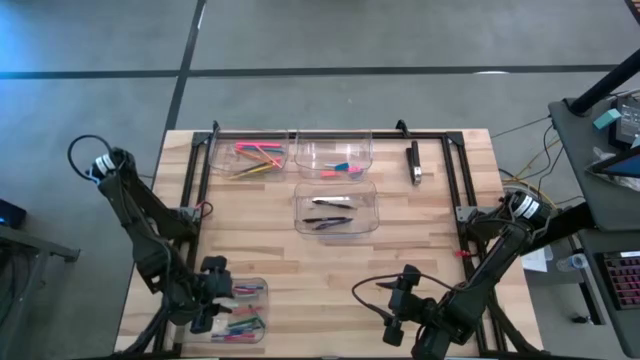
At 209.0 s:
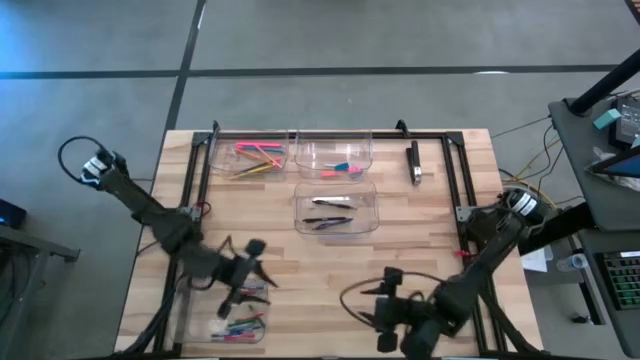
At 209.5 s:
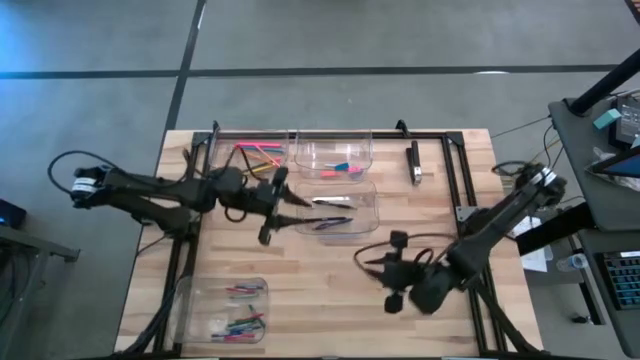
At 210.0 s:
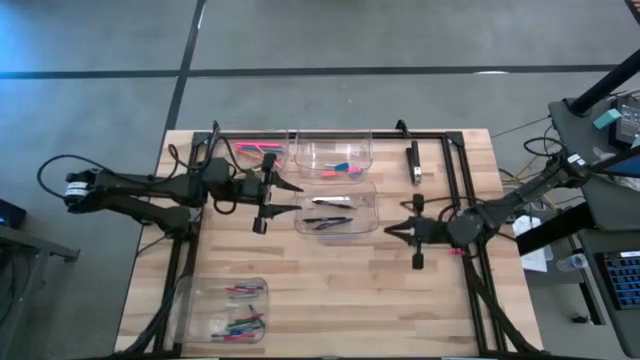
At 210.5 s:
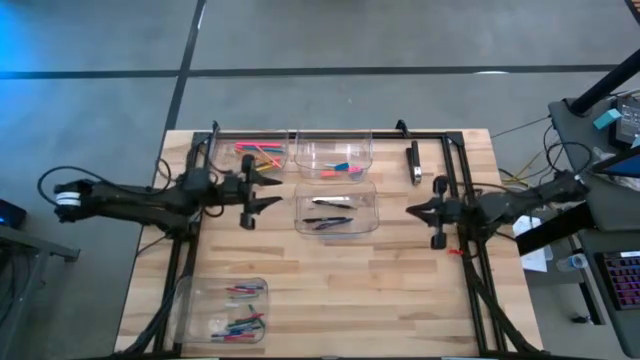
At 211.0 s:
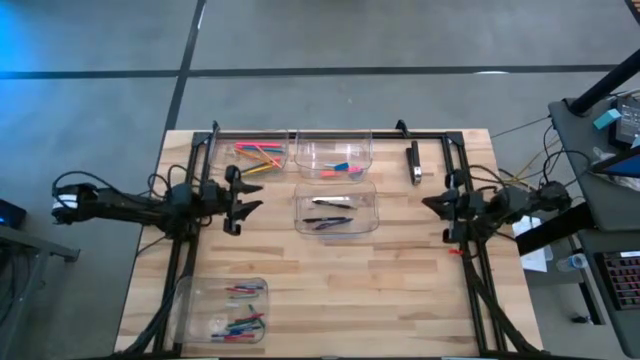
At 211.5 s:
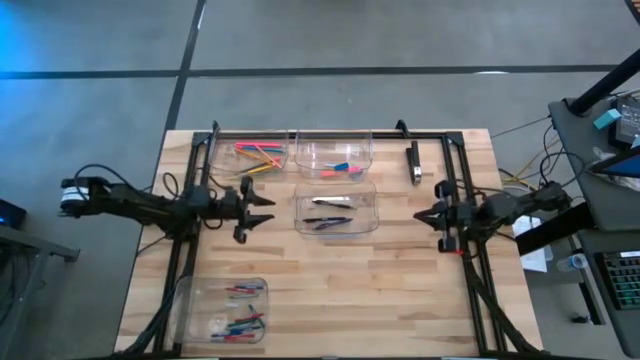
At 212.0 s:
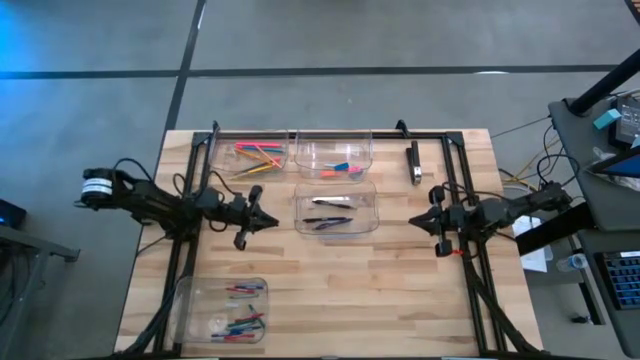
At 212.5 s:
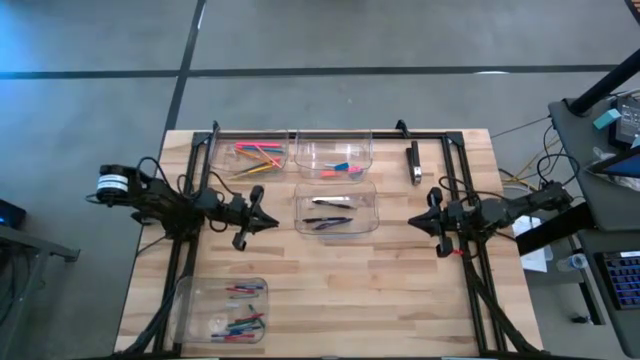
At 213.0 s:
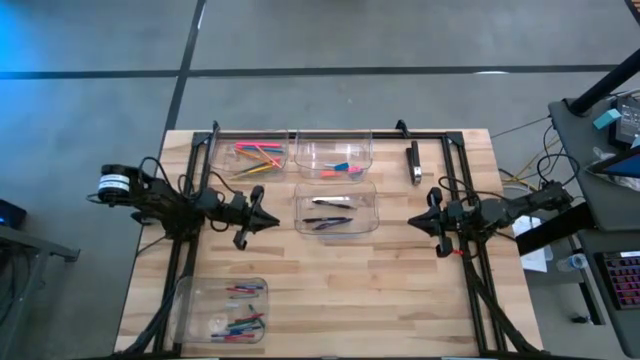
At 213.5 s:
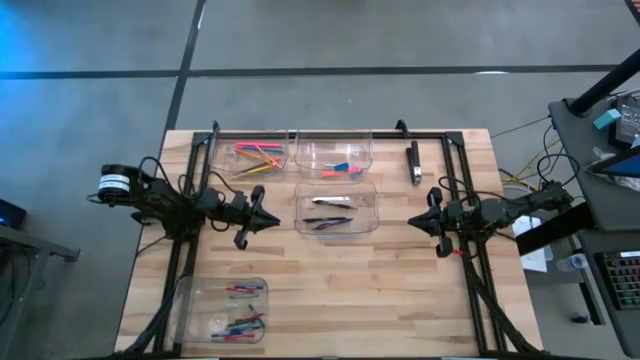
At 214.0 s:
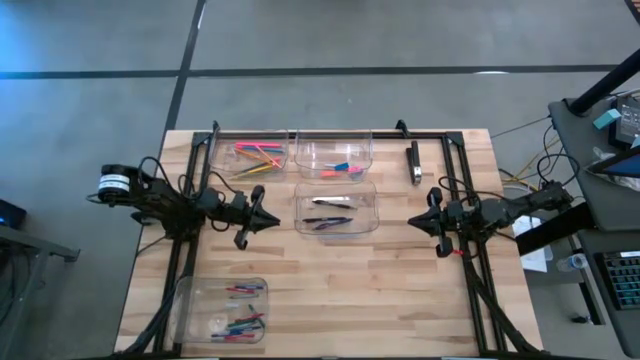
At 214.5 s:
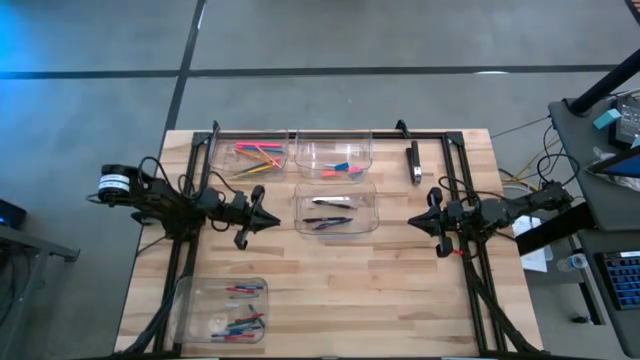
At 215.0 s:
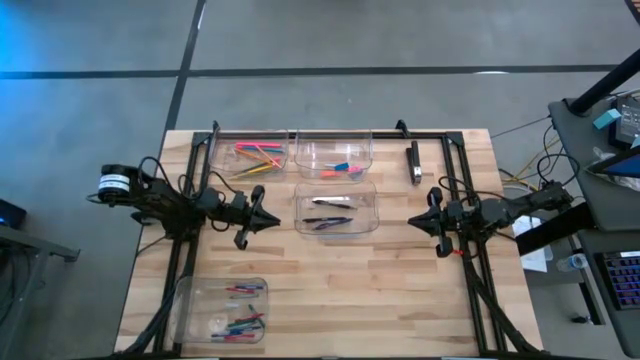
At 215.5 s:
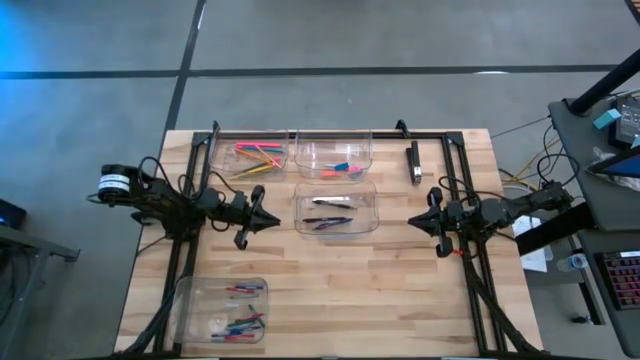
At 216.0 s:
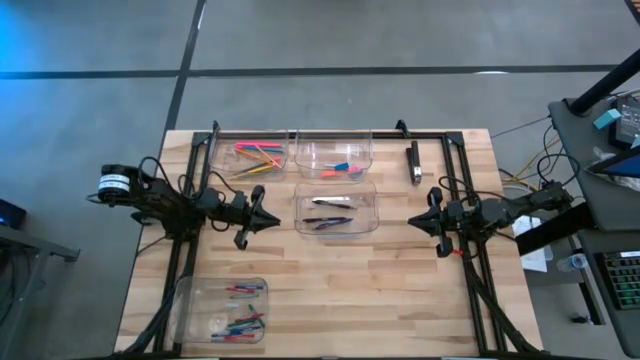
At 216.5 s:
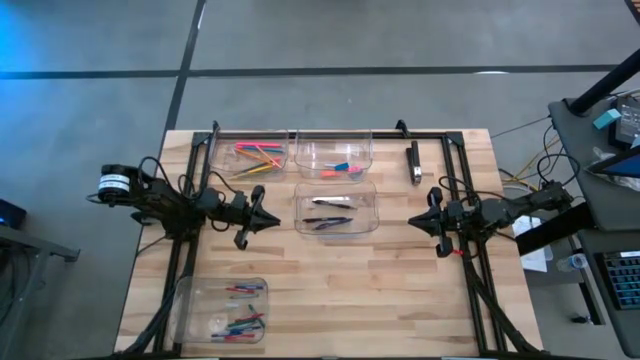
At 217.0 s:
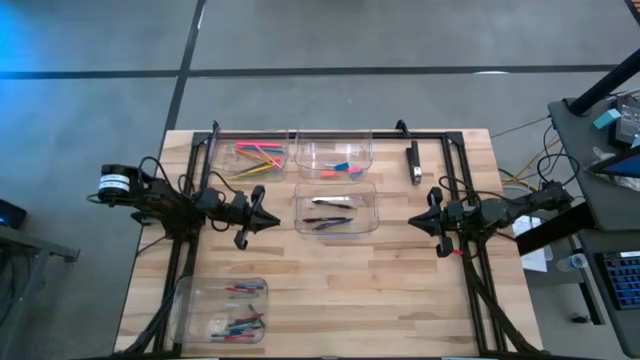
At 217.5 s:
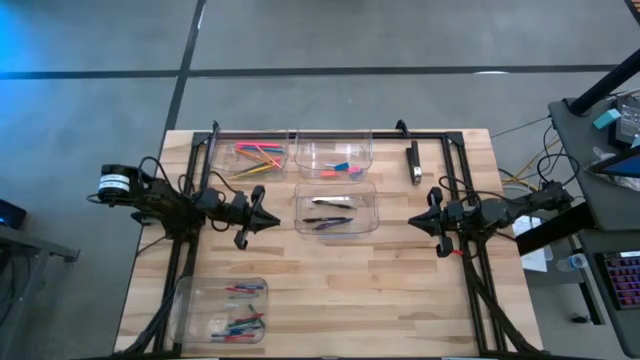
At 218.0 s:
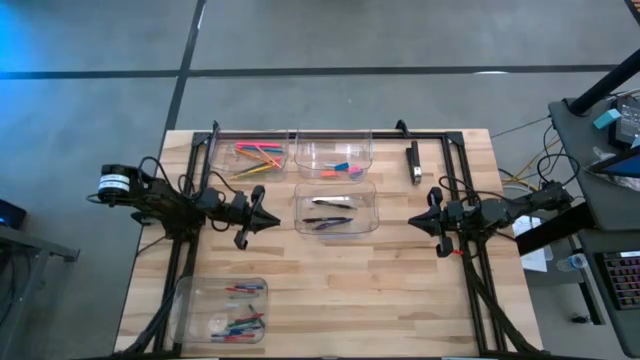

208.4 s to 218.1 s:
Task: Sort crayons/erasers/pens/pencils in bins
Return to Home Position

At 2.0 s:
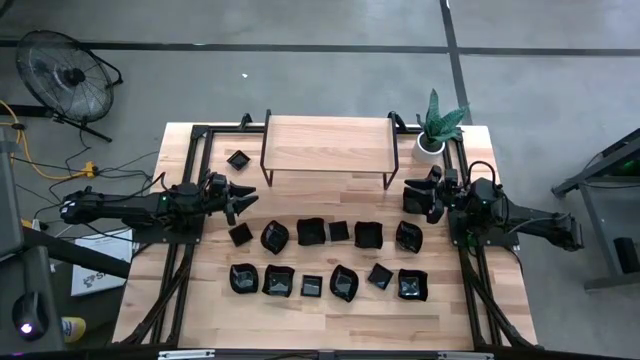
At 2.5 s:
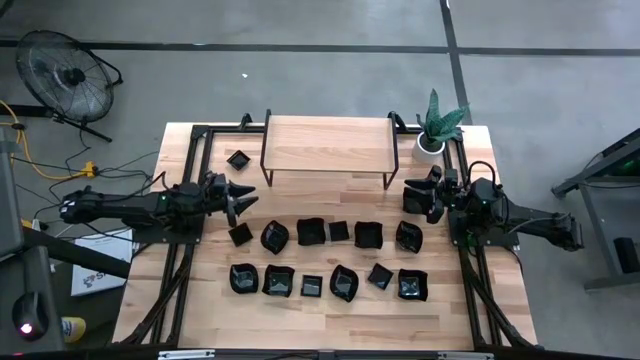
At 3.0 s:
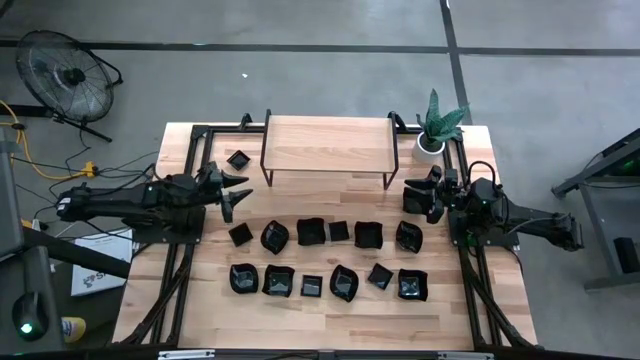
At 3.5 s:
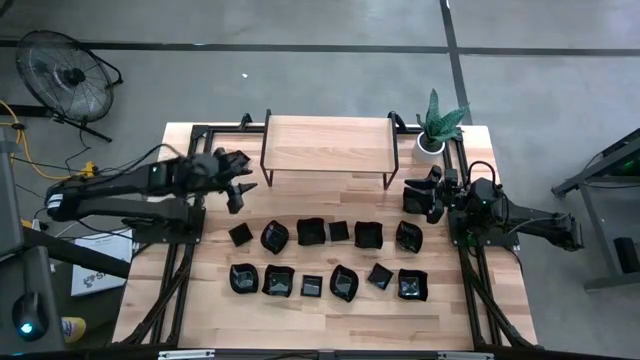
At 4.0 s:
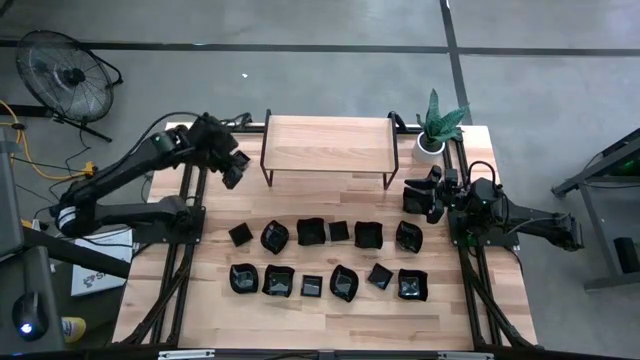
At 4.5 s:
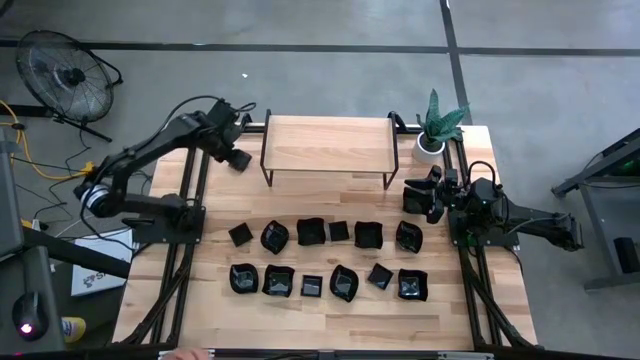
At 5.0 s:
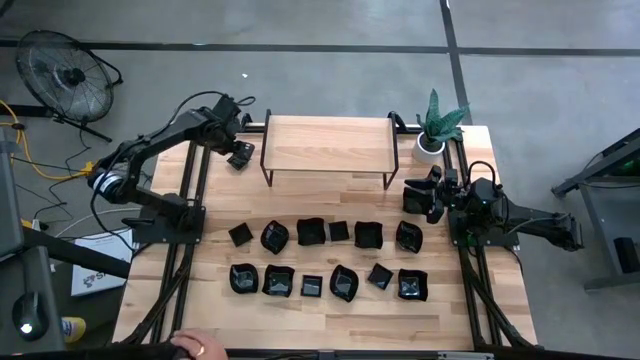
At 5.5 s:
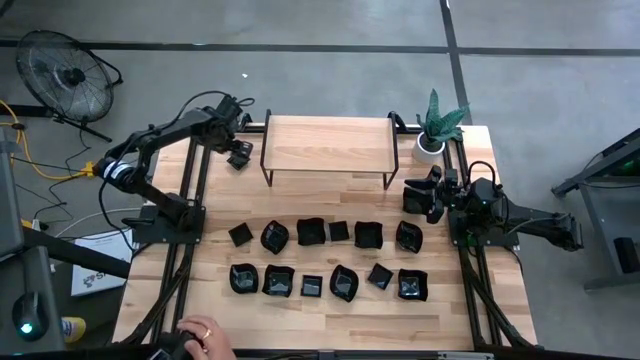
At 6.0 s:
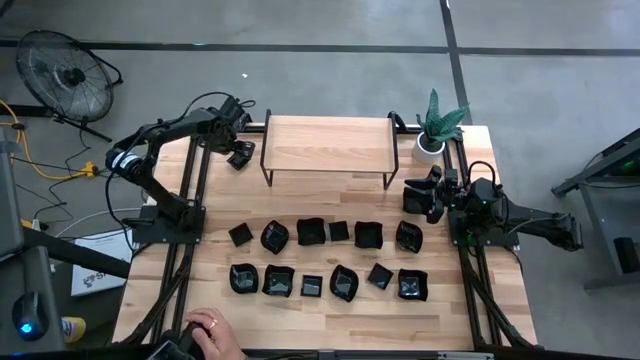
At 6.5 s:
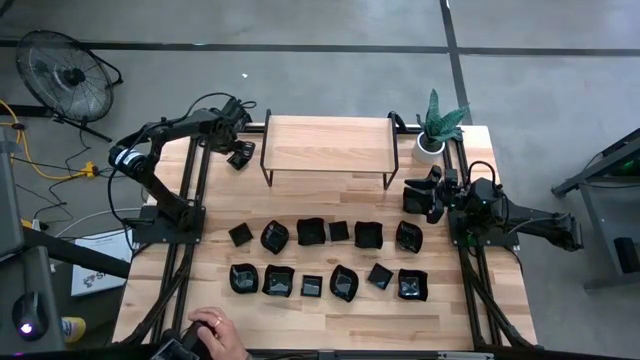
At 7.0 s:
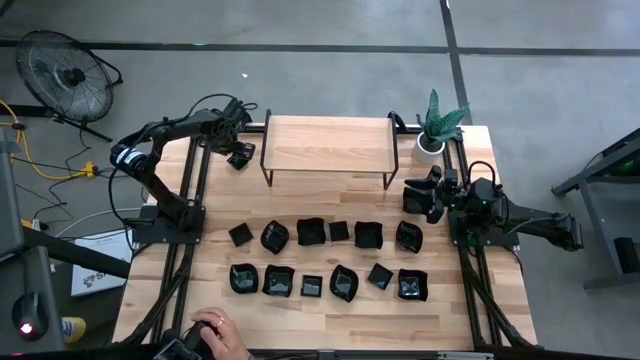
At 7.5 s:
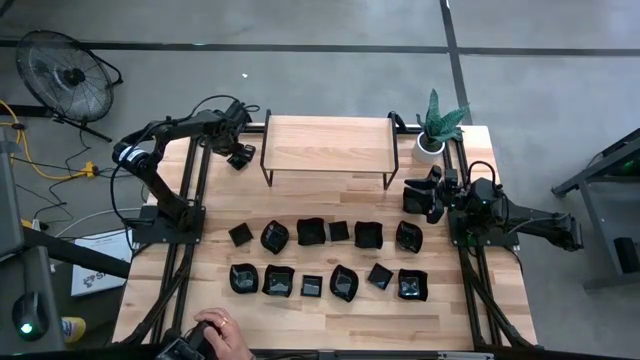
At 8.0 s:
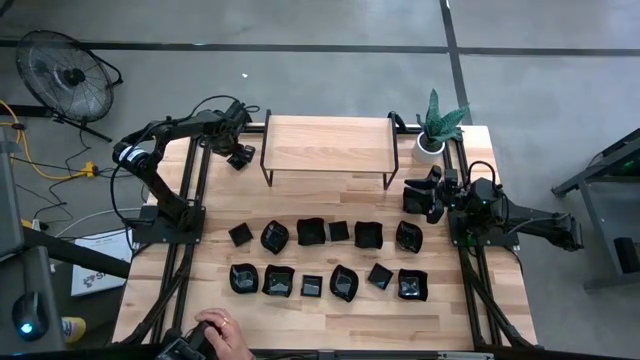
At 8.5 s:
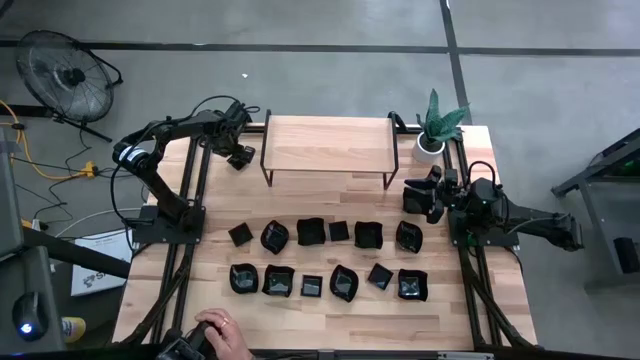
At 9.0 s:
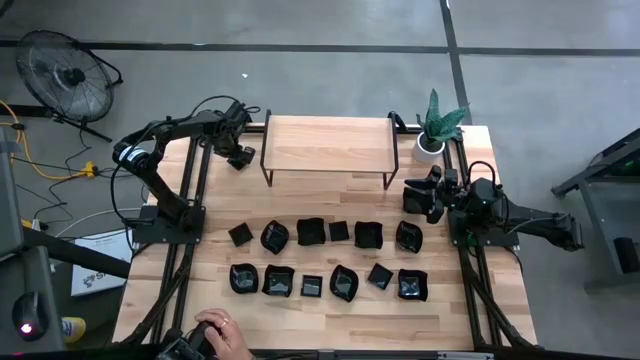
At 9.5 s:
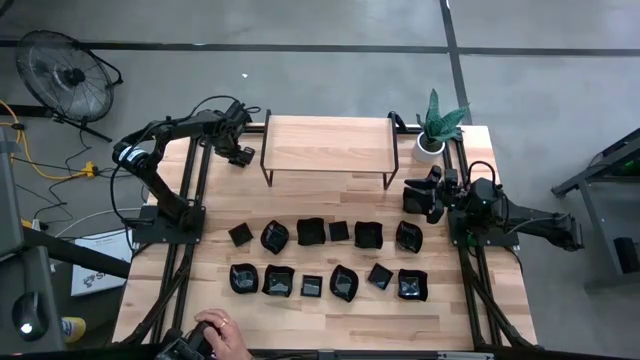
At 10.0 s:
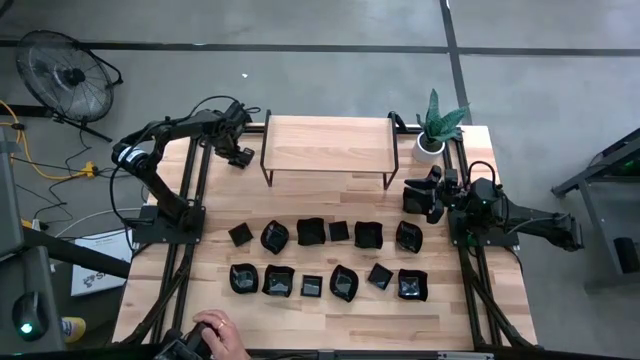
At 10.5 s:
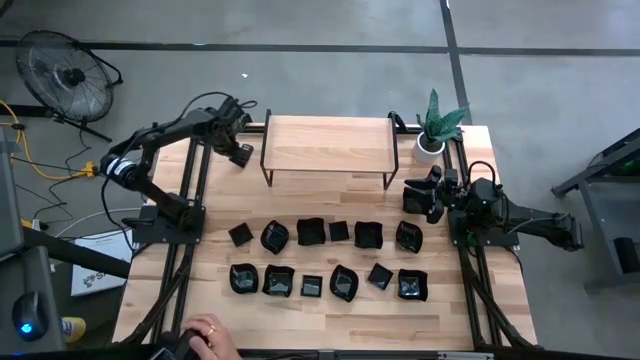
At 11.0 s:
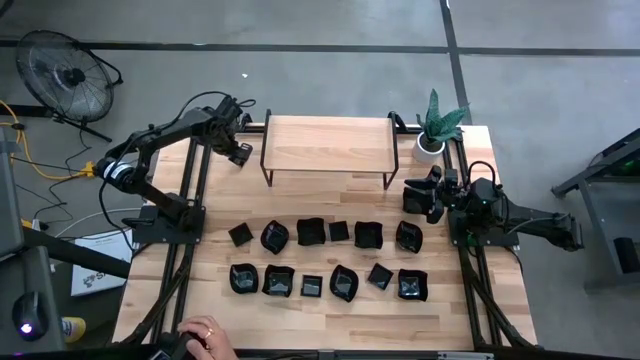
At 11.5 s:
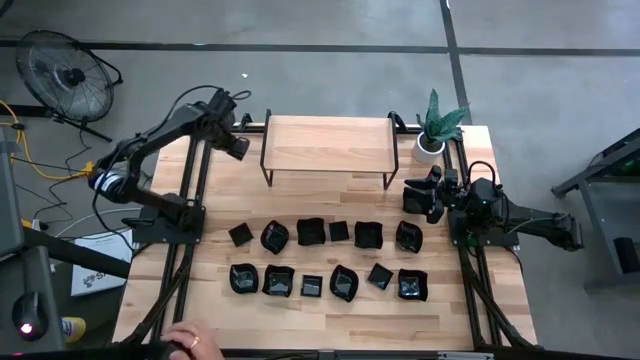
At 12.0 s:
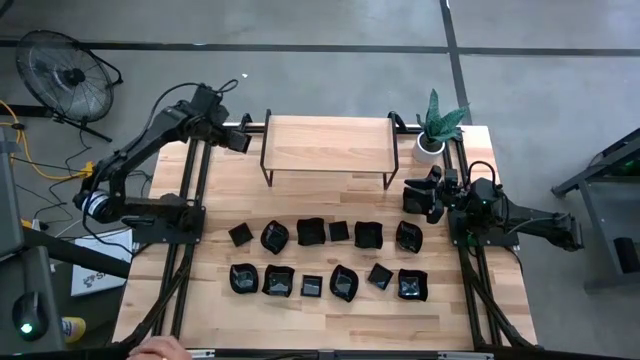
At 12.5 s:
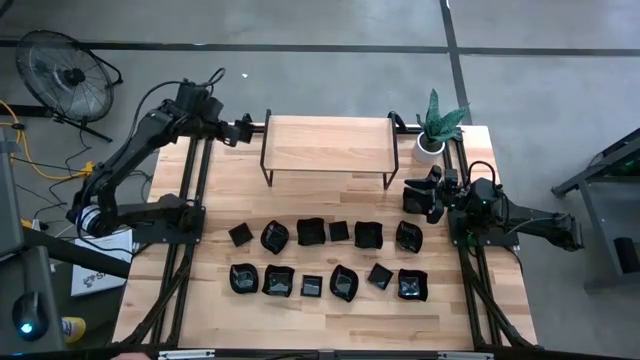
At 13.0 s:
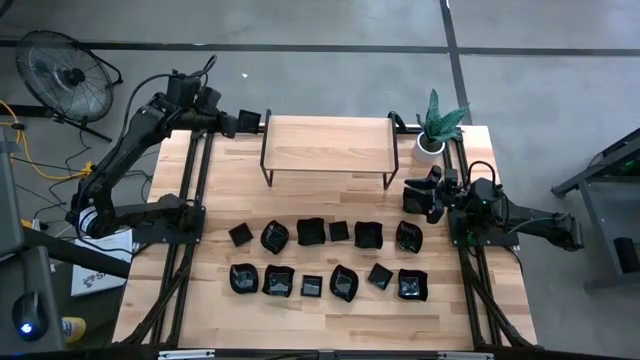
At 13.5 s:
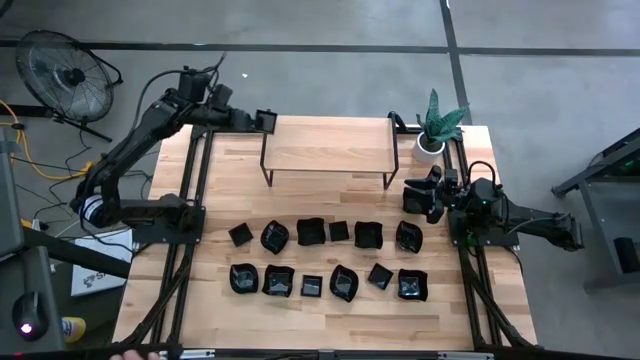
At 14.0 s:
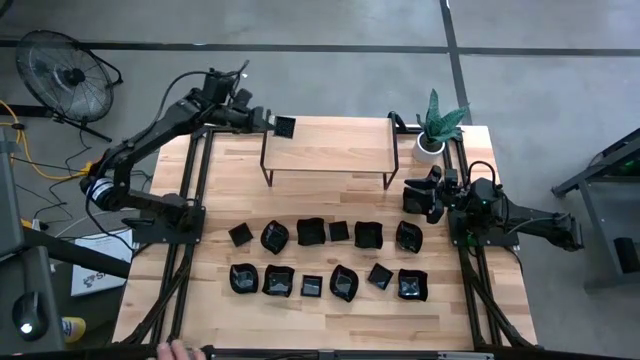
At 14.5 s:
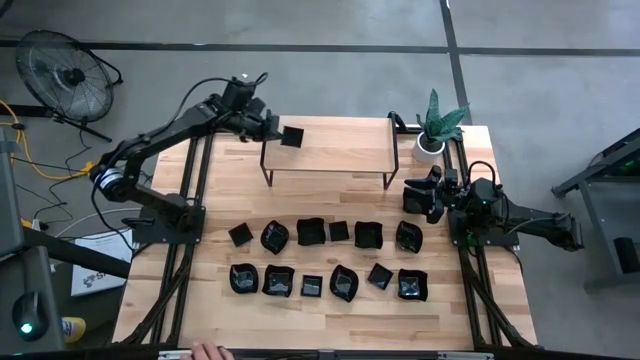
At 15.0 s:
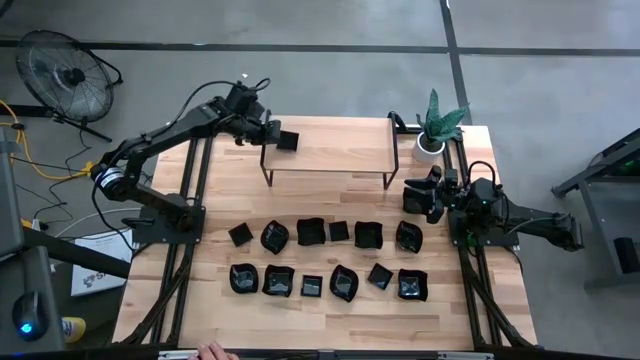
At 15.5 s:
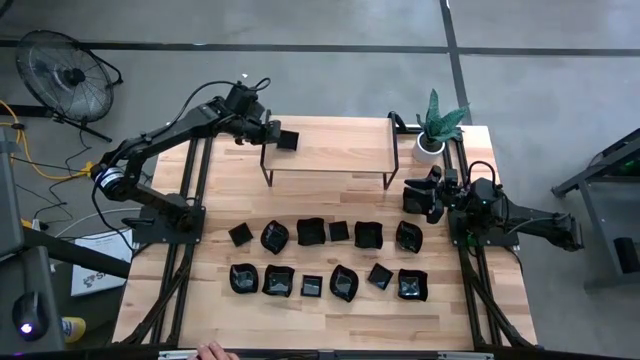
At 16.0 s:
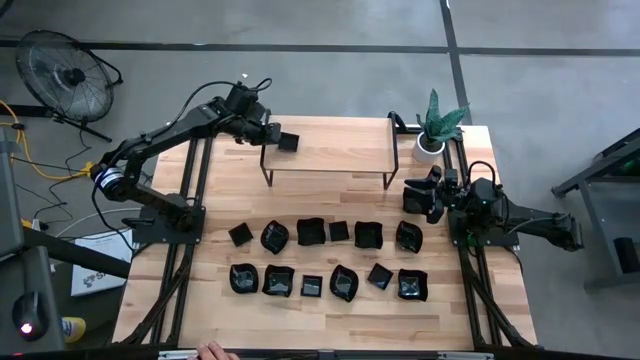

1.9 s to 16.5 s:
Task: Pick & Place Mini shaped plates
Put the black square plate on the shelf
